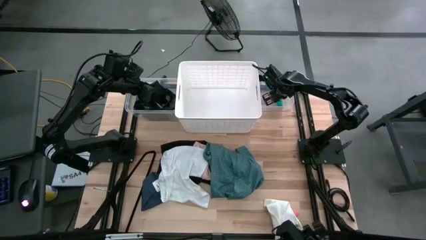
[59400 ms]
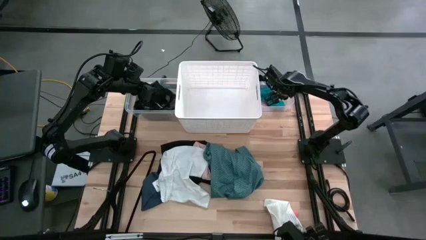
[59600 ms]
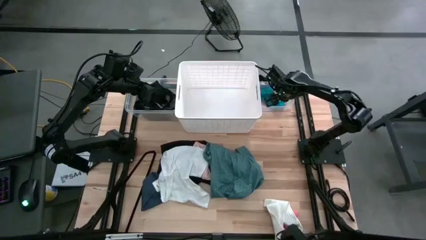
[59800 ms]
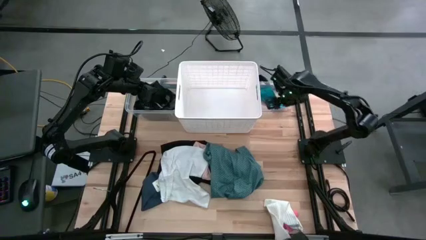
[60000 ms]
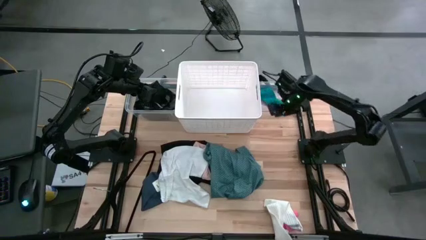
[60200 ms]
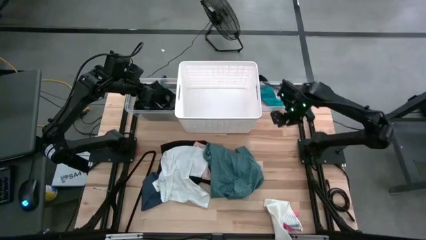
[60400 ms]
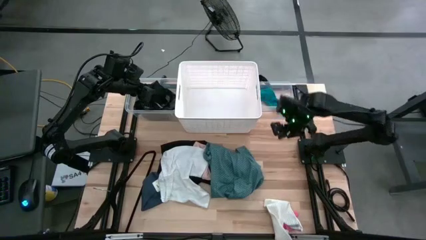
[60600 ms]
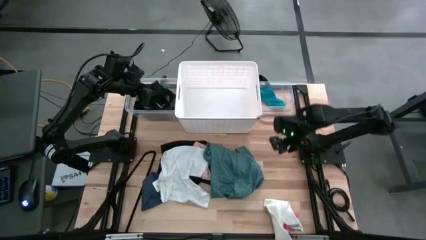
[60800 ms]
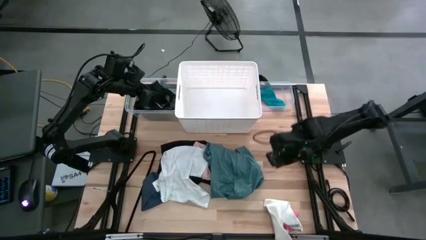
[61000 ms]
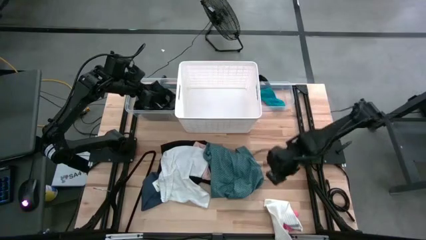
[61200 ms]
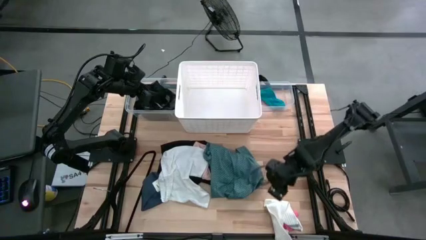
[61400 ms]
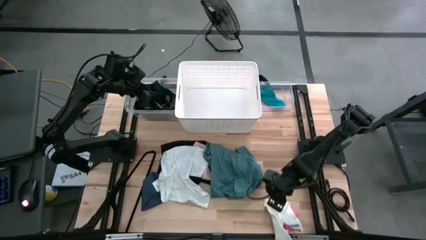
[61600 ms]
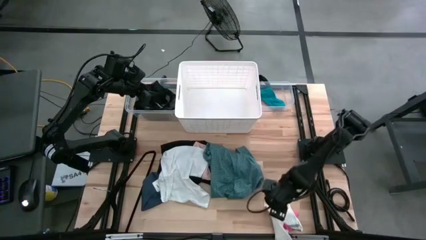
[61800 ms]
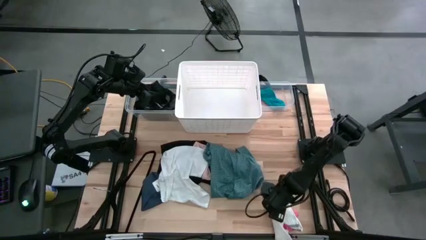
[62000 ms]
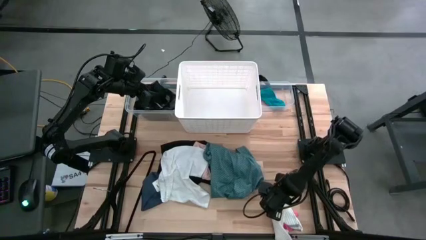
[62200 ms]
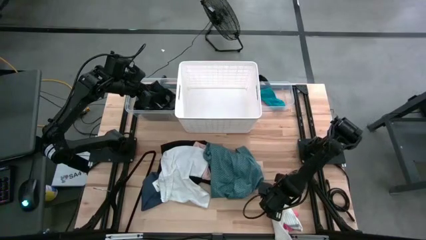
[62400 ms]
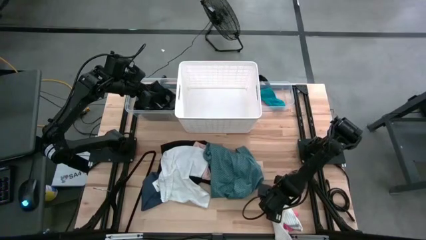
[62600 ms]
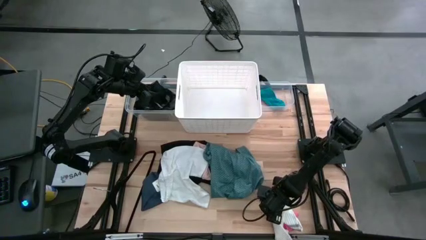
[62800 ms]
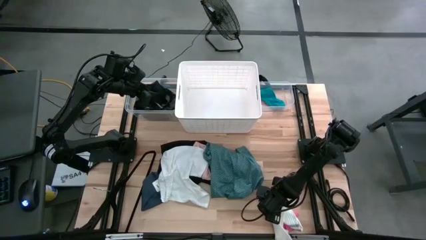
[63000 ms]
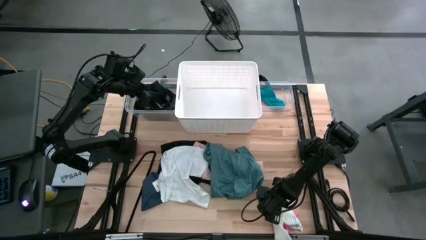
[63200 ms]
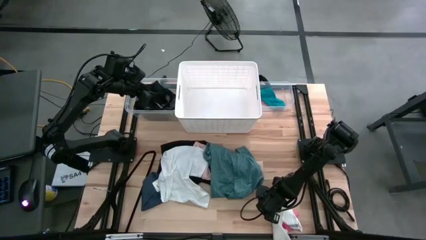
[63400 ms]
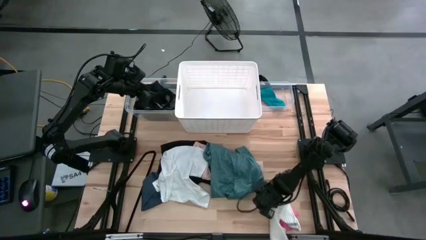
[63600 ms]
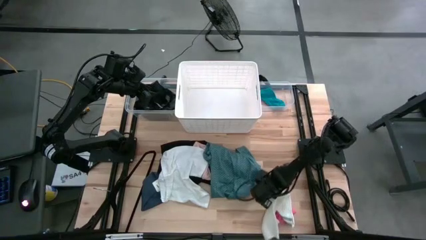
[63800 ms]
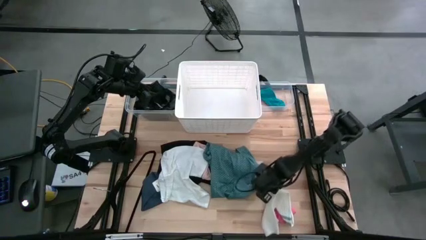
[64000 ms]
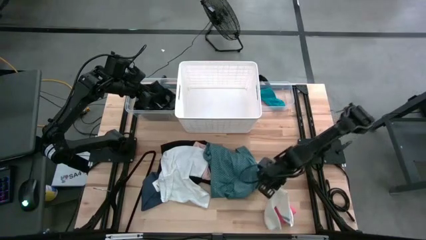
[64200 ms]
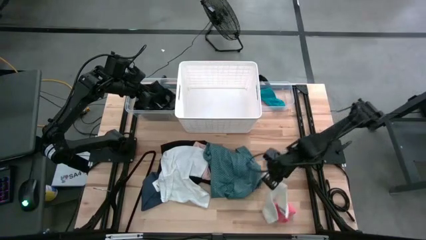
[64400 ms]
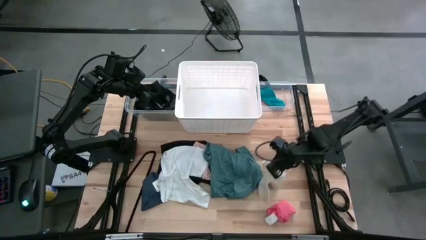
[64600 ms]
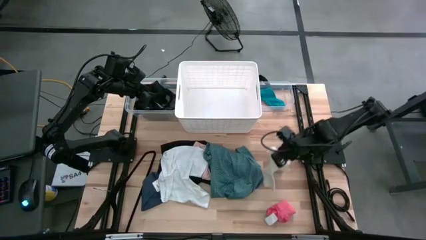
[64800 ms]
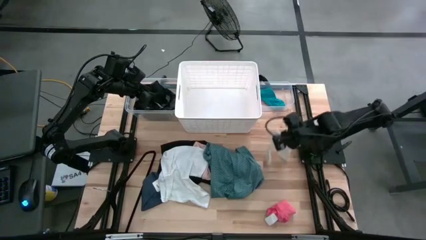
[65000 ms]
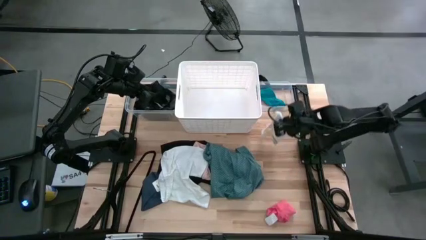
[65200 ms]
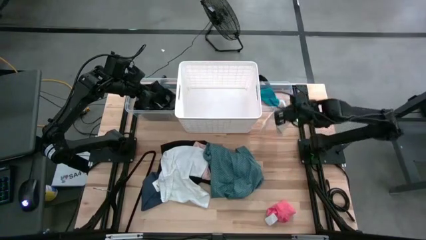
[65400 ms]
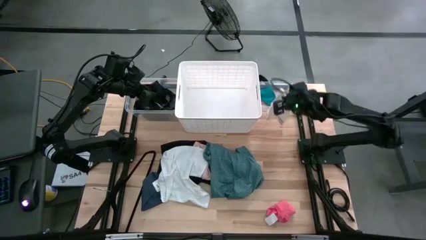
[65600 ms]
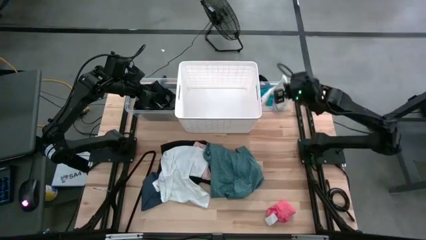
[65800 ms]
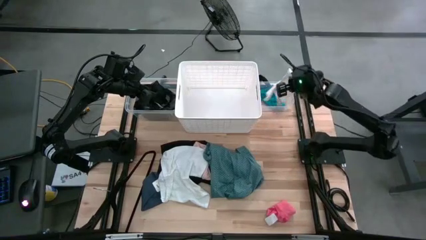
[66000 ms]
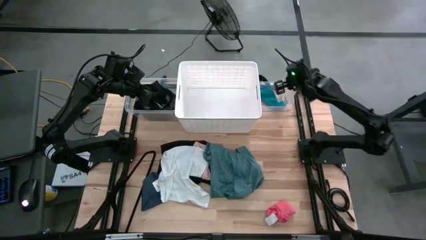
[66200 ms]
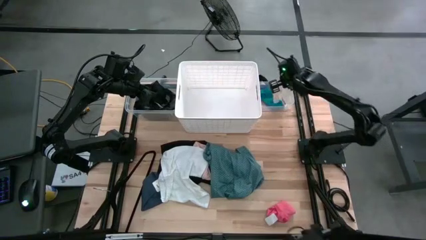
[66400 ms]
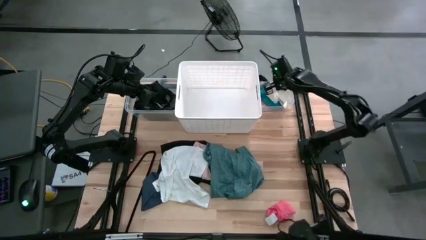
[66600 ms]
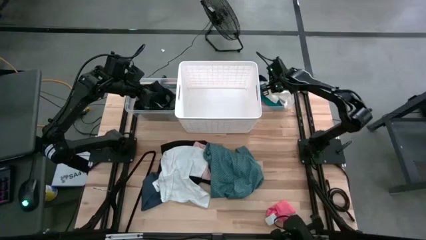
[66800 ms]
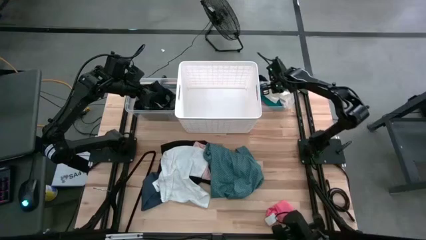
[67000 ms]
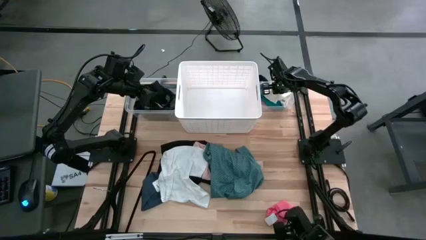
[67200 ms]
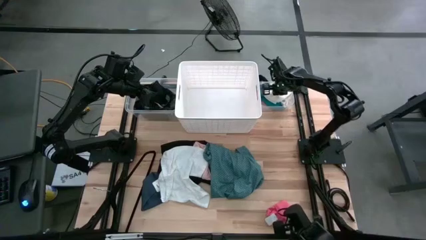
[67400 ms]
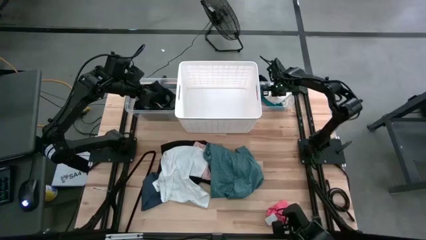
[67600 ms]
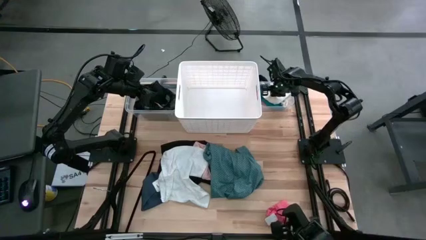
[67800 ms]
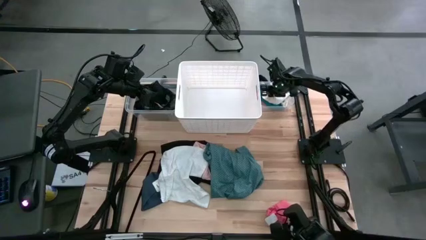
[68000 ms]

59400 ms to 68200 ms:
Task: Pick & Place Cloths
Put the white sock into the right transparent bin

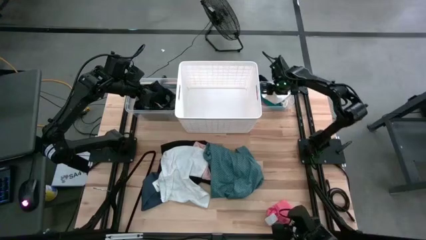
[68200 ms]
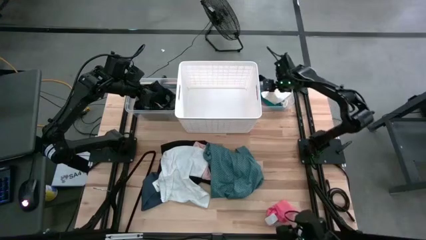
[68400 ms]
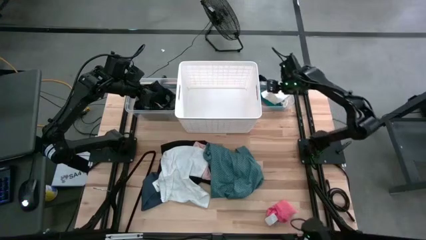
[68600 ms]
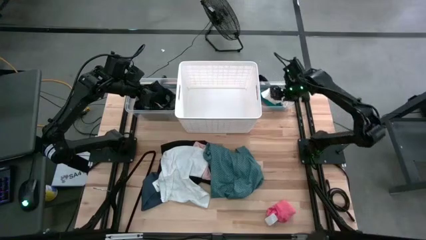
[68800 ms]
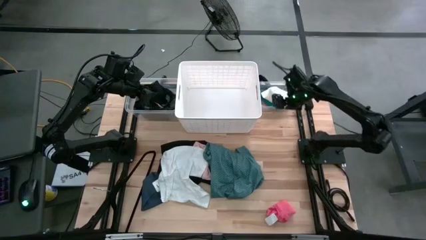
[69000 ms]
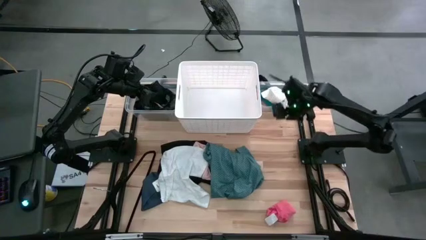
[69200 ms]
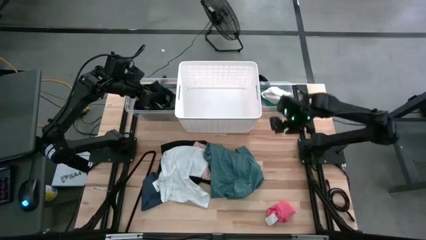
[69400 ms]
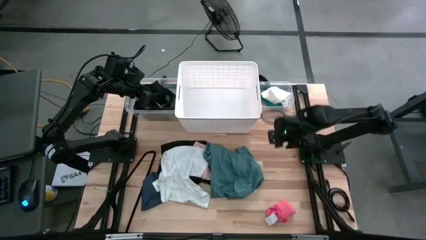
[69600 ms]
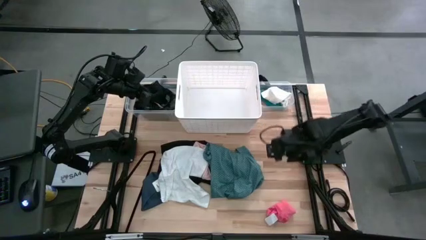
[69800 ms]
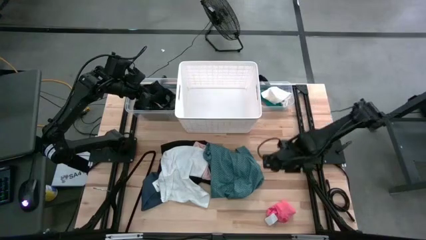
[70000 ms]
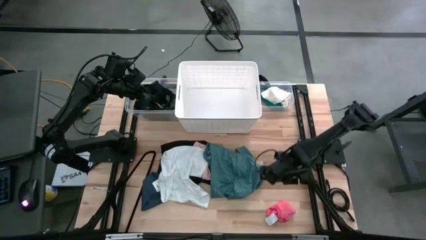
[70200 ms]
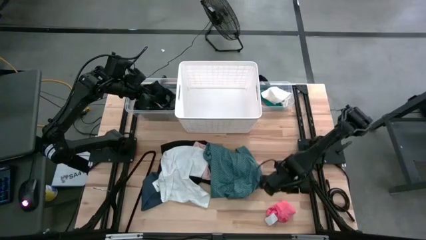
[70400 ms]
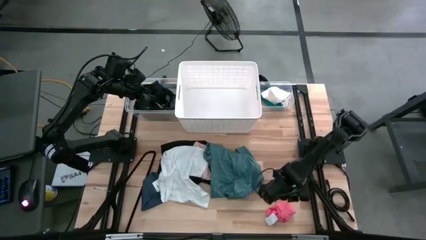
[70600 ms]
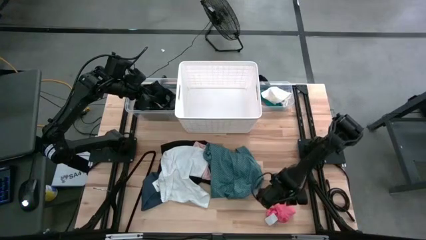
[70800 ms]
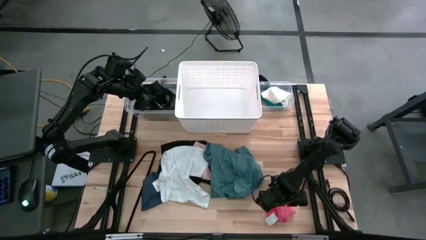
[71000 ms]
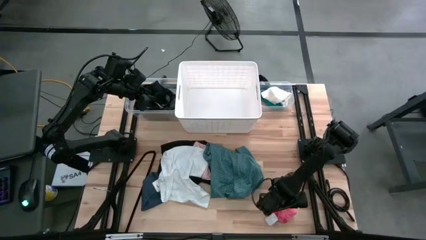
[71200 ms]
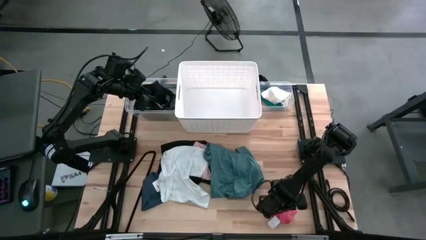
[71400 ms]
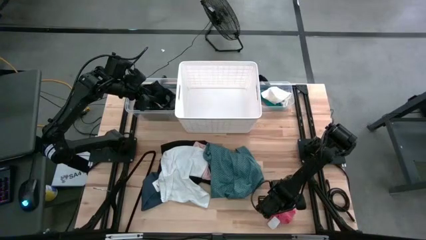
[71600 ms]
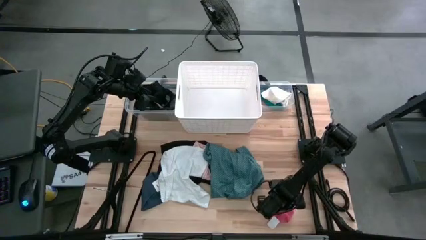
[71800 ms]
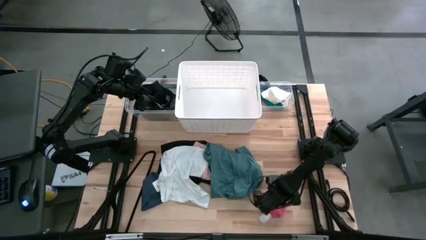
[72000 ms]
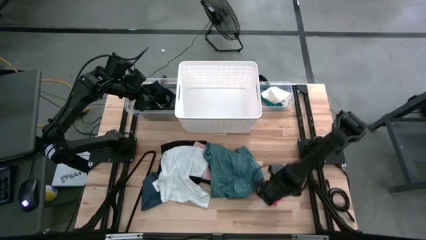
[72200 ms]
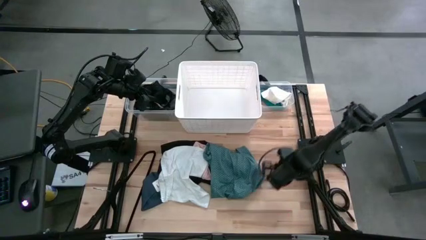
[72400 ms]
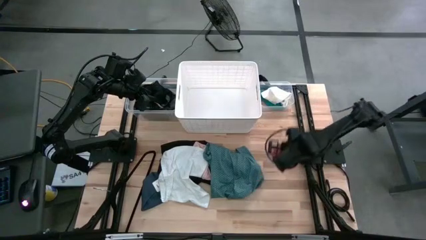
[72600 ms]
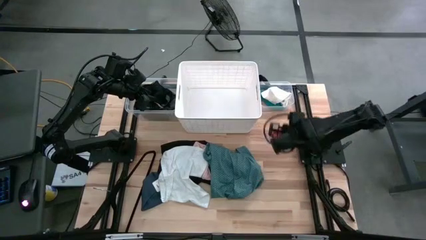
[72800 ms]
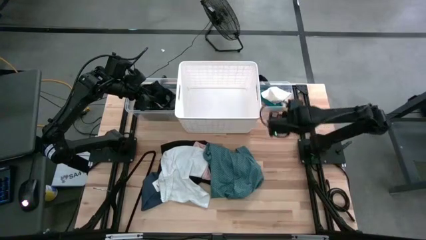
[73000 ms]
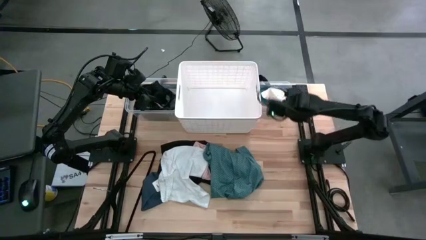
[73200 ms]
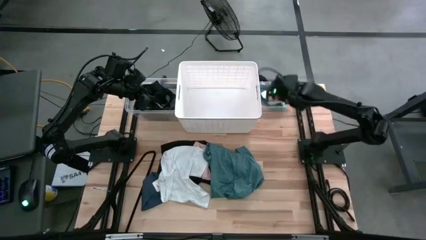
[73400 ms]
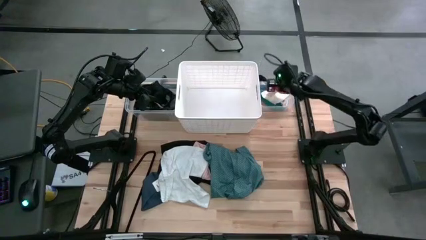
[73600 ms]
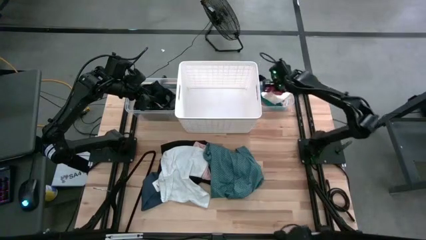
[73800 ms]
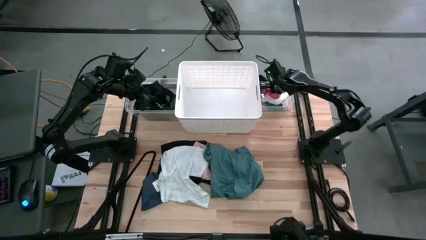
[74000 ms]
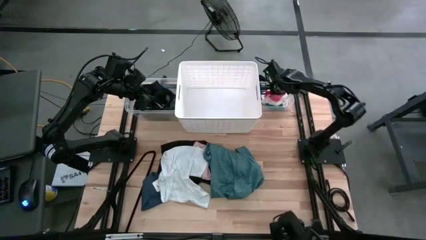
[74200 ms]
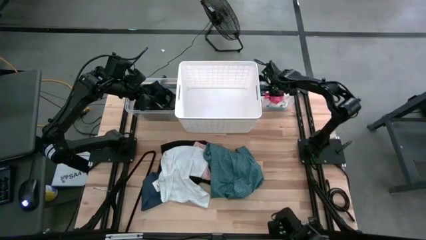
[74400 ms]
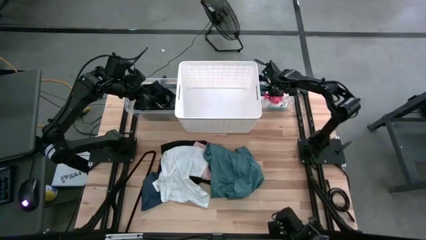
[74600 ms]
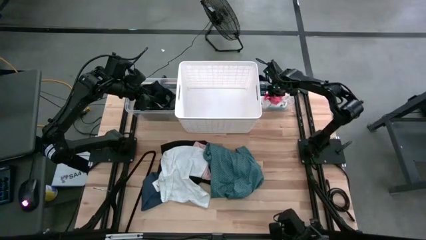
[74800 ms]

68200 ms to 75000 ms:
Put the pink sock into the right transparent bin
